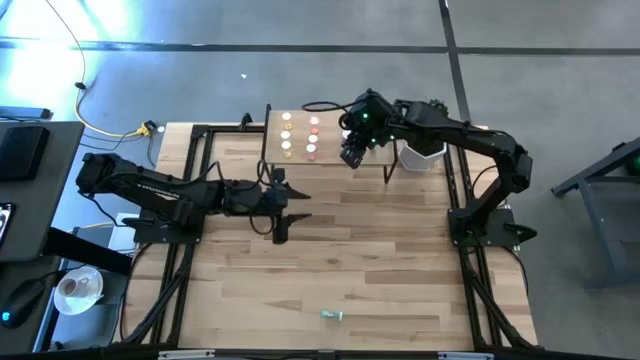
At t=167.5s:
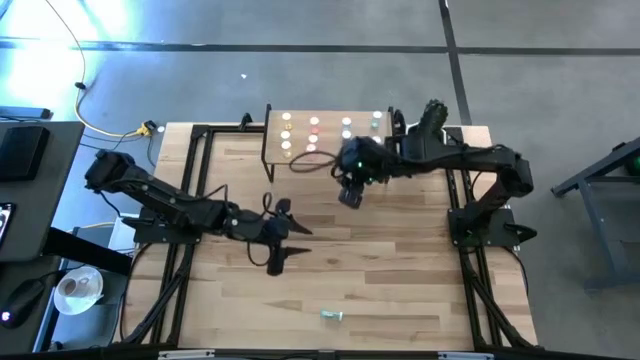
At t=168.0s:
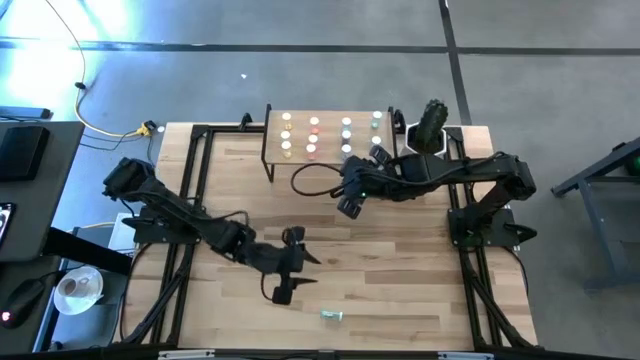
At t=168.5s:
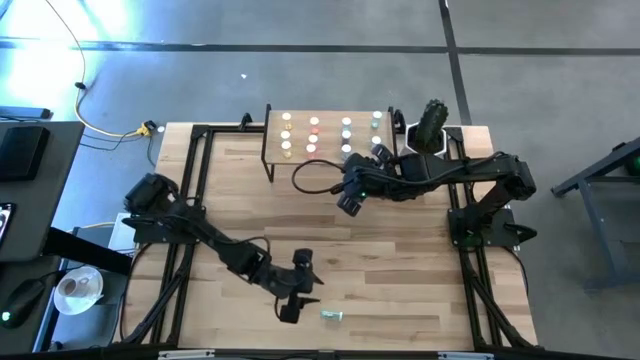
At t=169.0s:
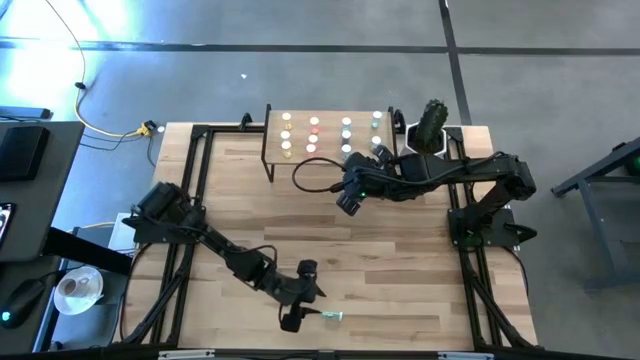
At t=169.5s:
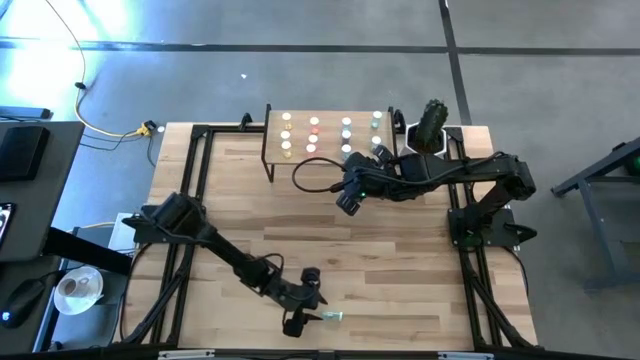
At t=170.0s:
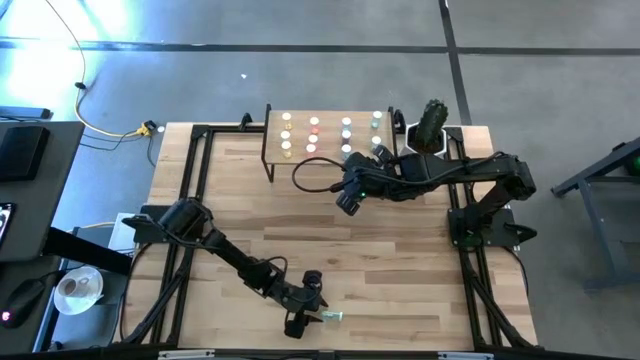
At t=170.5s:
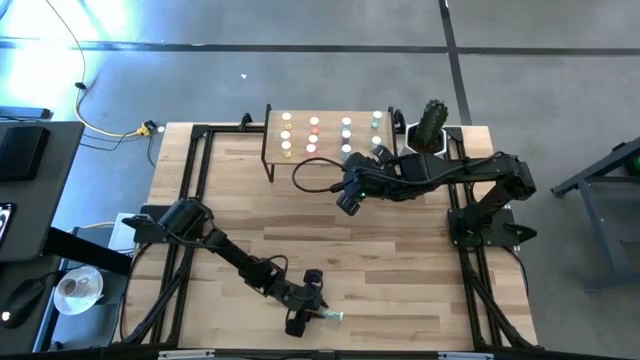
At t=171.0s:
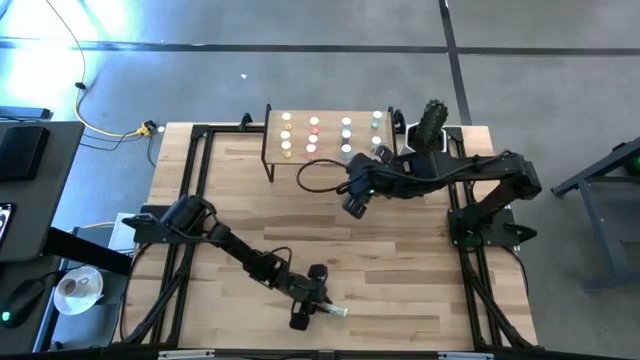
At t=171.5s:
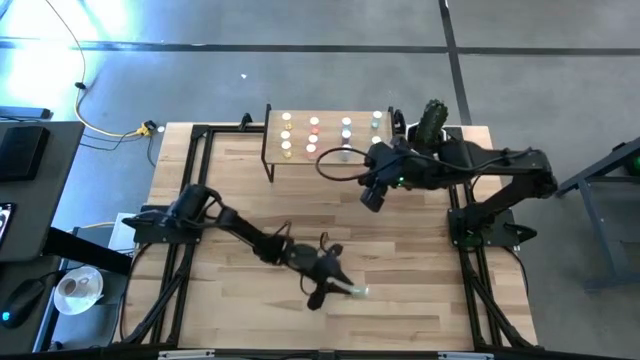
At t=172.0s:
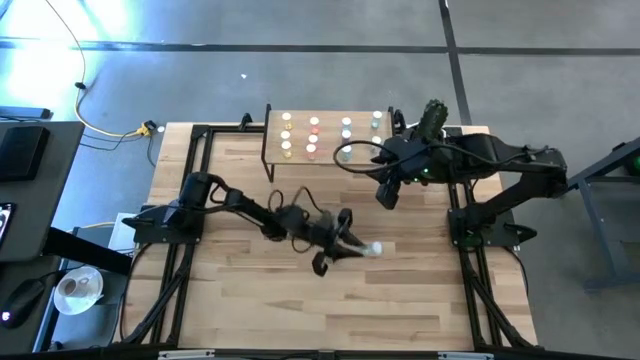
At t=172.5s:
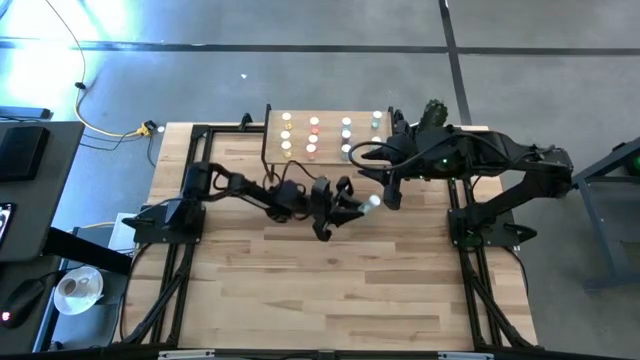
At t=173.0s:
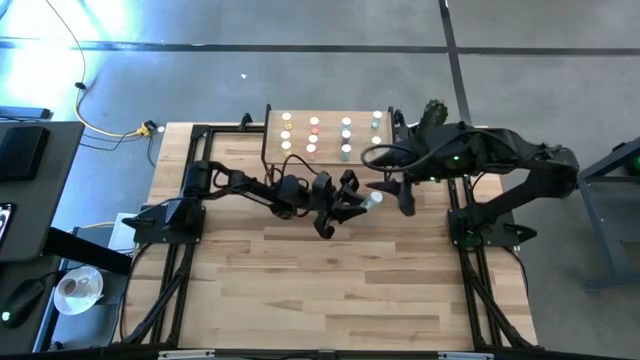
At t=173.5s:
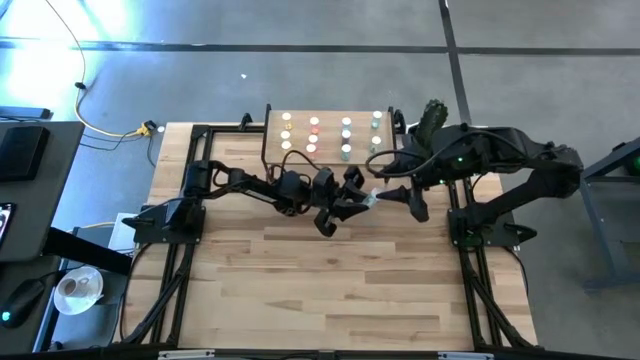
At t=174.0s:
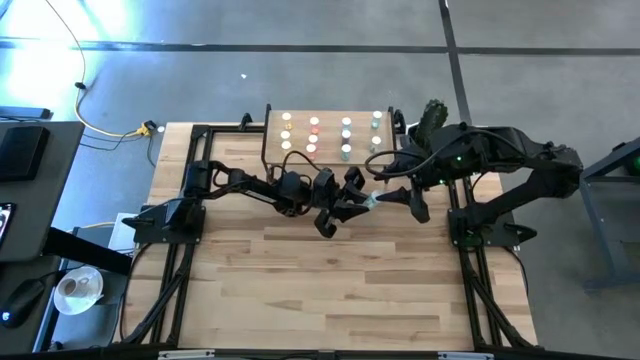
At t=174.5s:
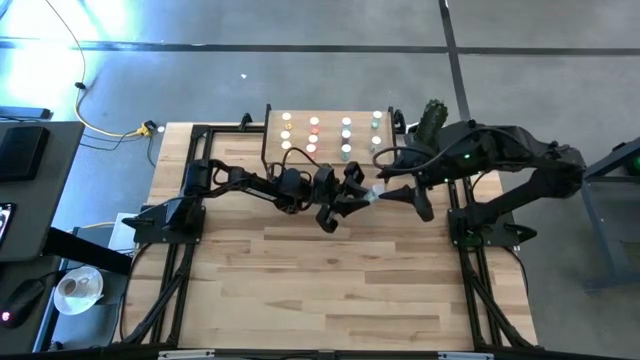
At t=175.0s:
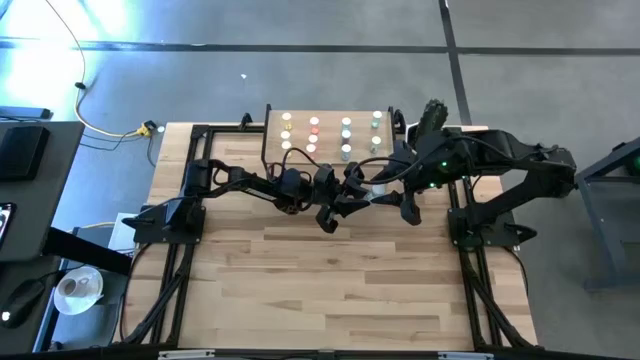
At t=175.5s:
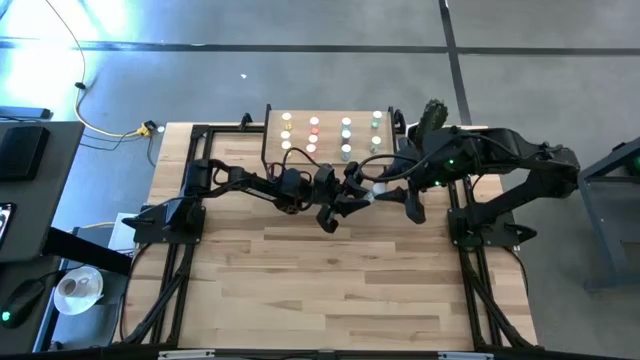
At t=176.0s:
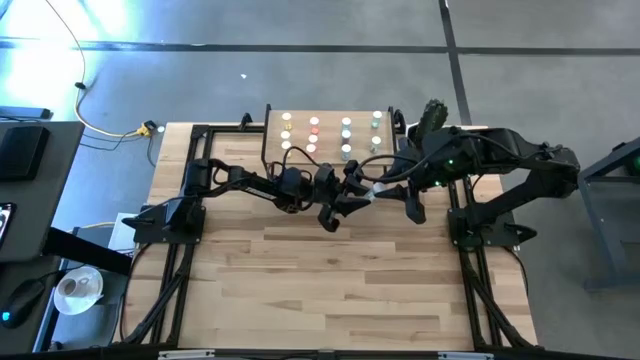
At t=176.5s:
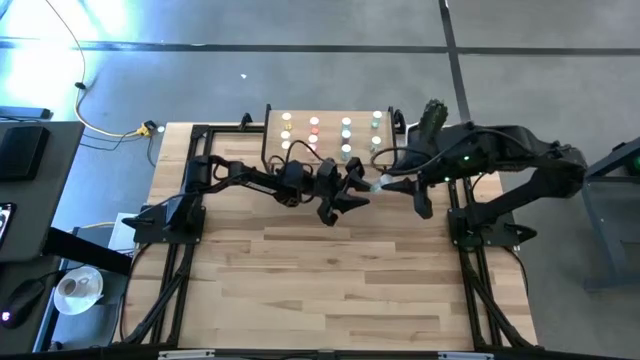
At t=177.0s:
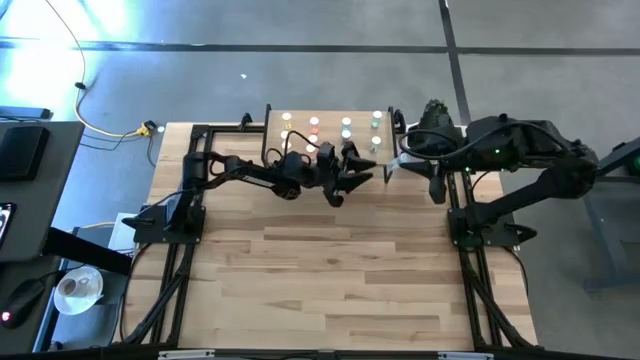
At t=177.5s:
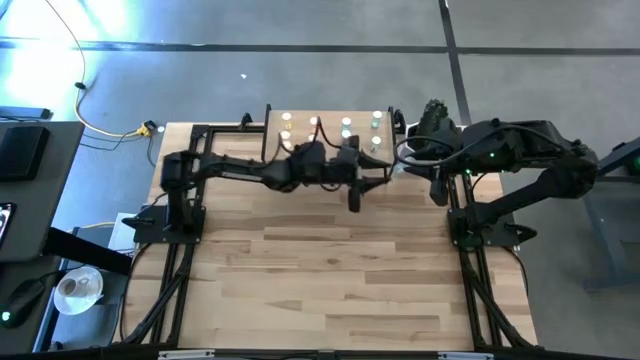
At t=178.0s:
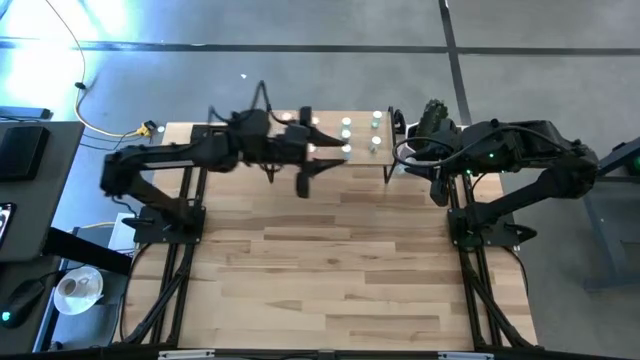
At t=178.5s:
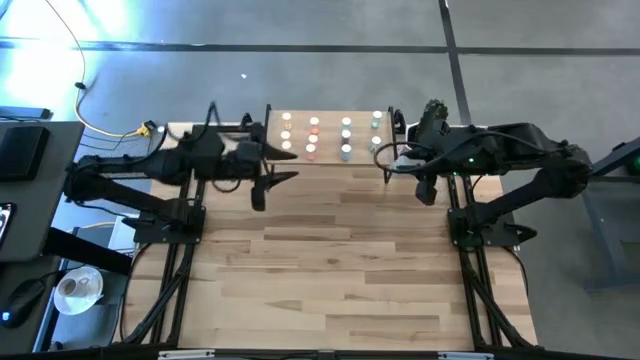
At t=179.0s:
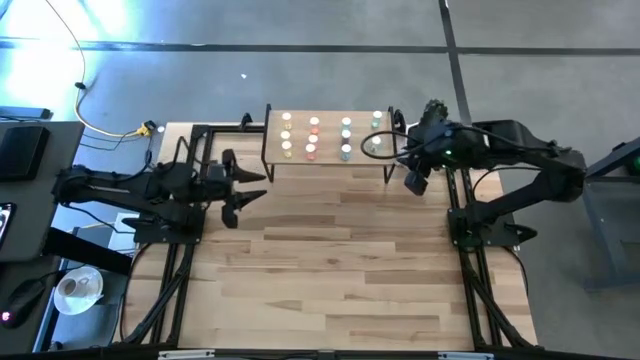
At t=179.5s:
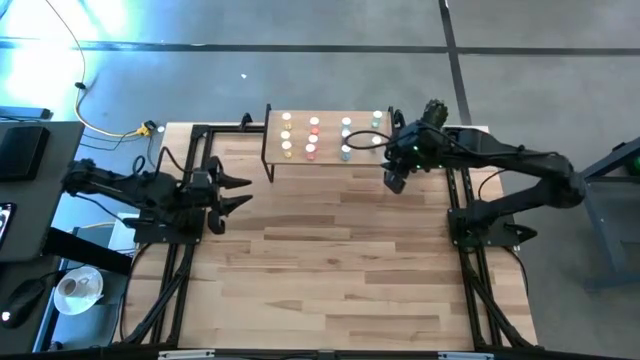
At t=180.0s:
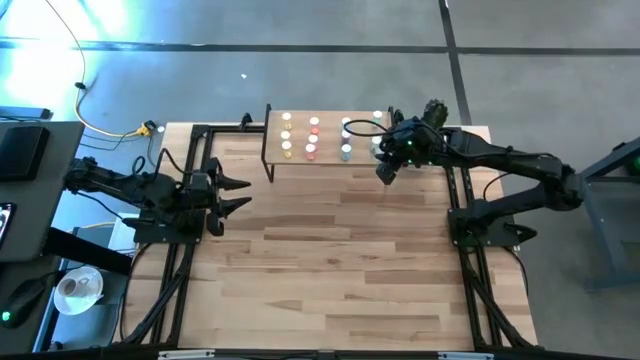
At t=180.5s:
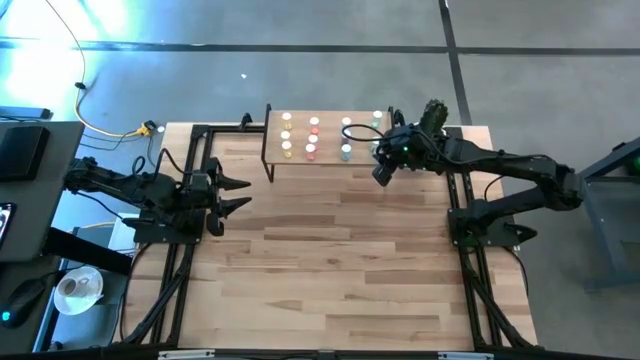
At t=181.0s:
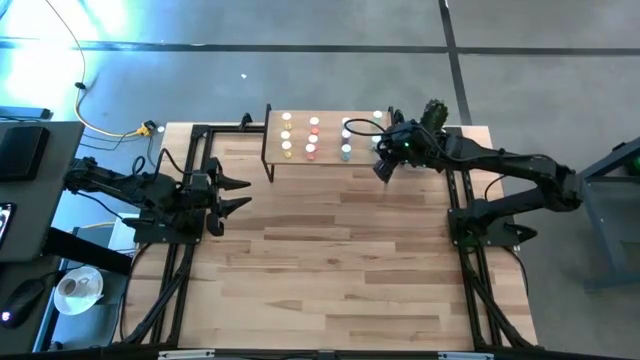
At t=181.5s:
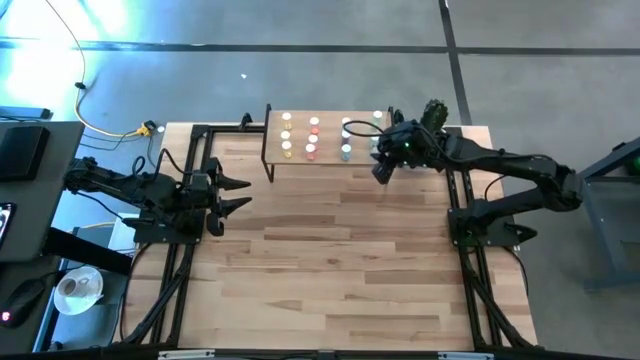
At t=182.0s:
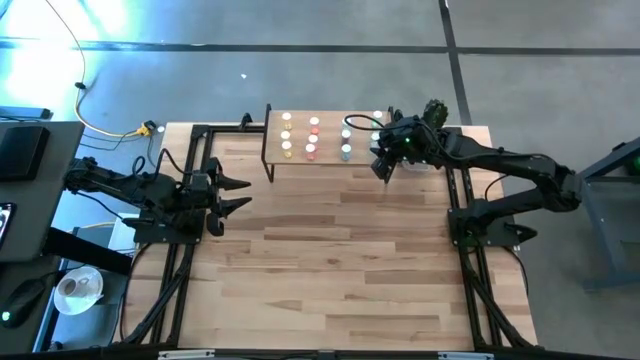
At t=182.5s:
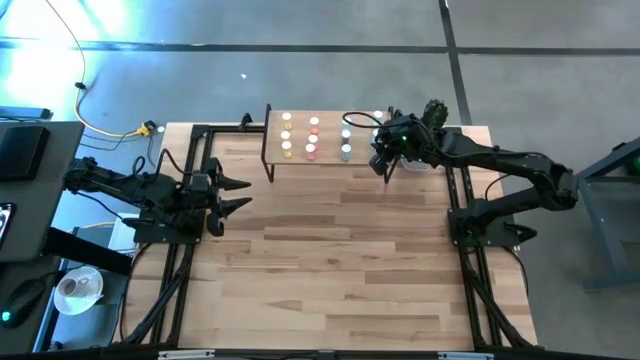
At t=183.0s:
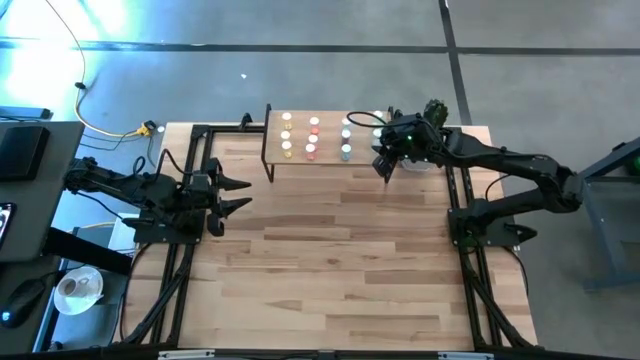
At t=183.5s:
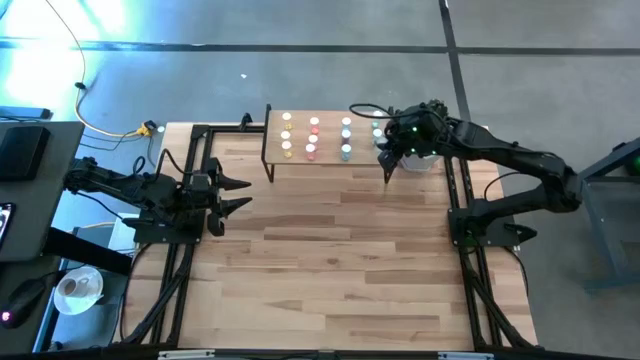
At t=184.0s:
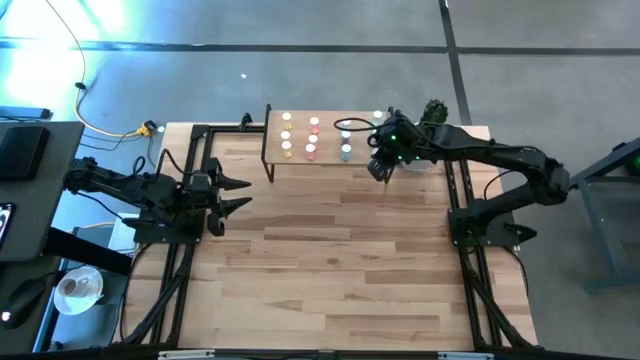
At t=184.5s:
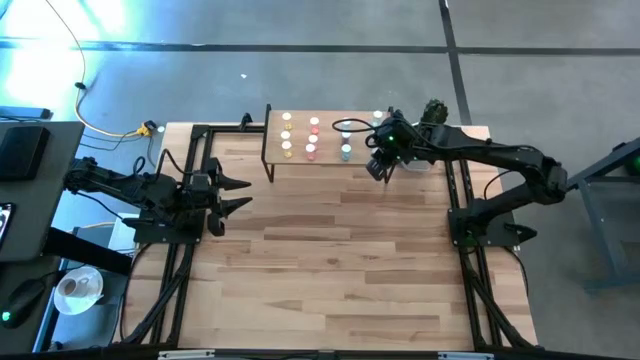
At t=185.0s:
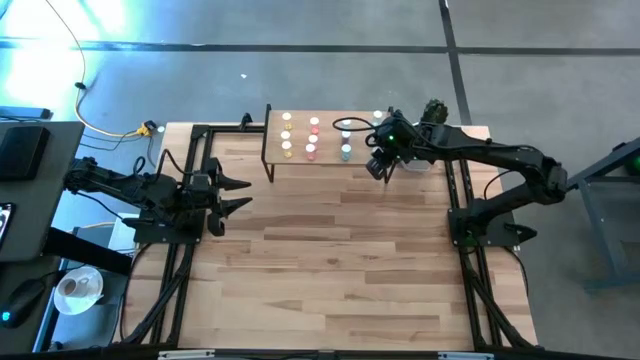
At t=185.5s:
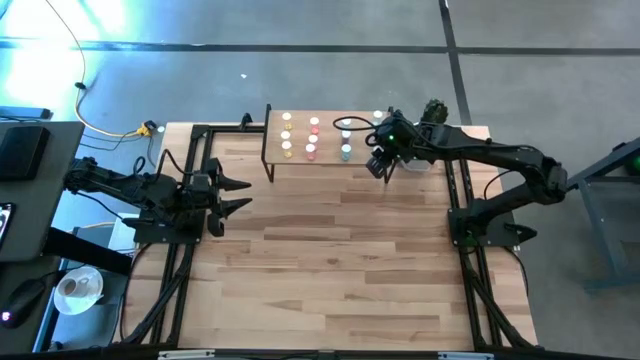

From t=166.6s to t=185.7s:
Task: Pick and place medicine bottles onto shelf by color
Put the green pill bottle on the shelf aligned with the other green pill bottles

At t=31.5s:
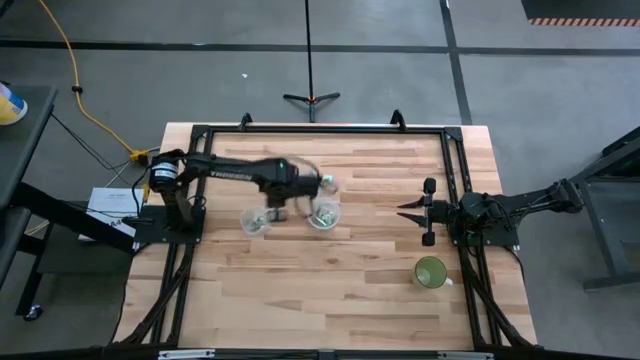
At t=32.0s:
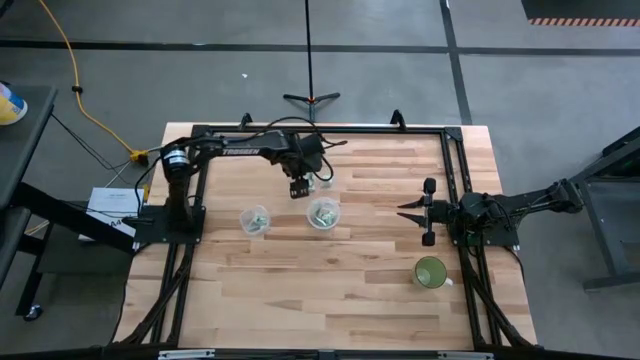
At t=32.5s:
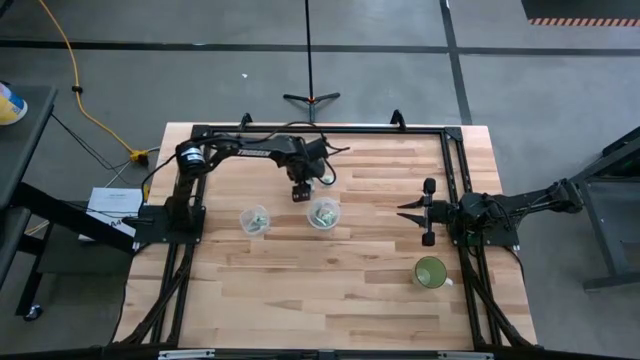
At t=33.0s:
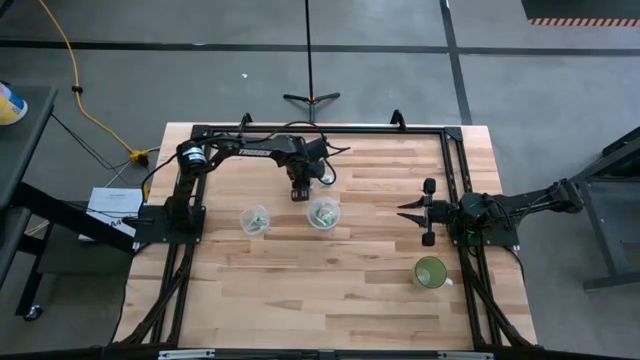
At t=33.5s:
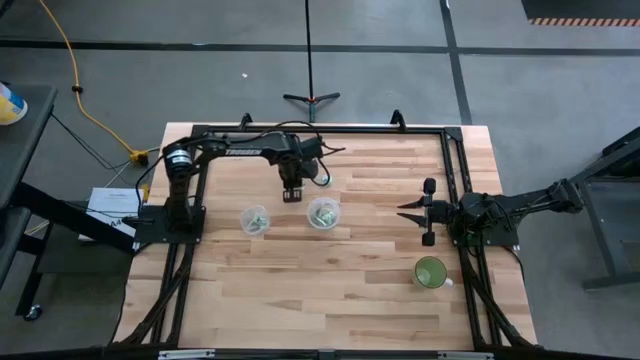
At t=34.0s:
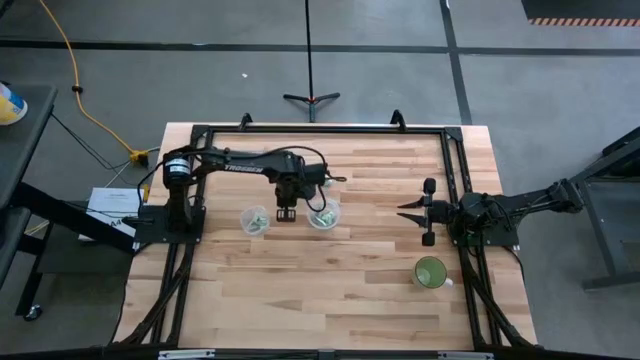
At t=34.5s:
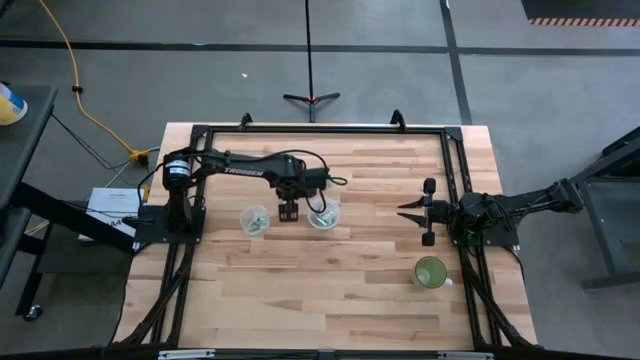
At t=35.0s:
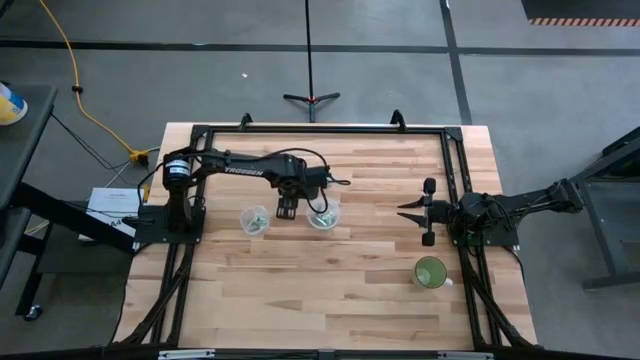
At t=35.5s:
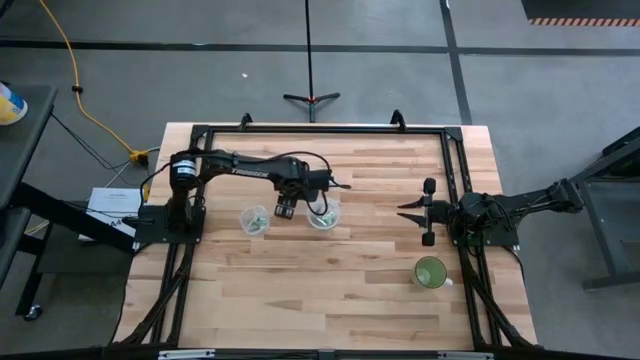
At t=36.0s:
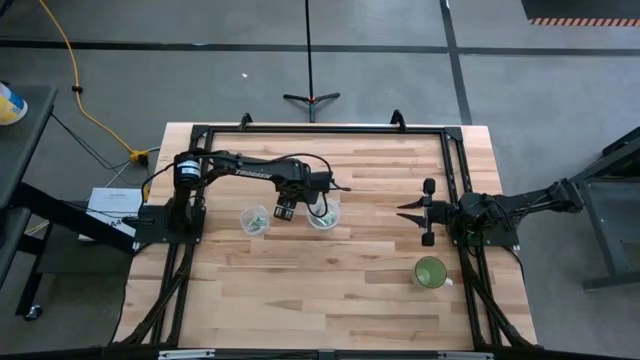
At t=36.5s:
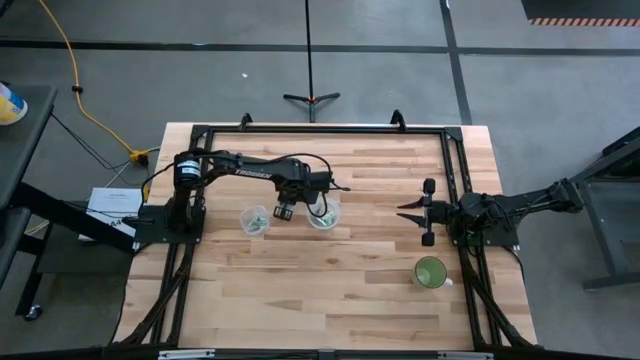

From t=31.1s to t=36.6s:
Task: Pick and place Stevia / Truvia into bins
Put the white stevia packet into the left transparent container
